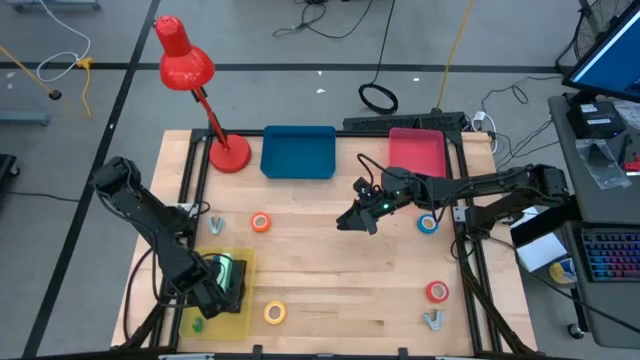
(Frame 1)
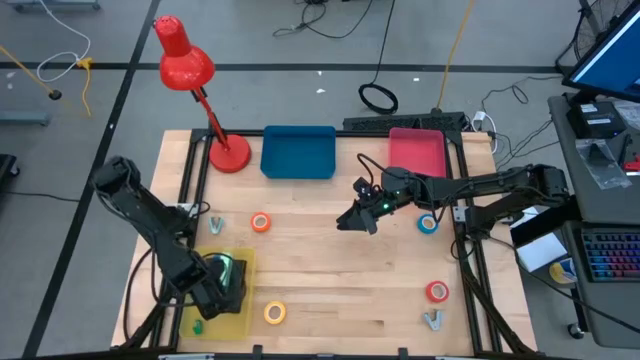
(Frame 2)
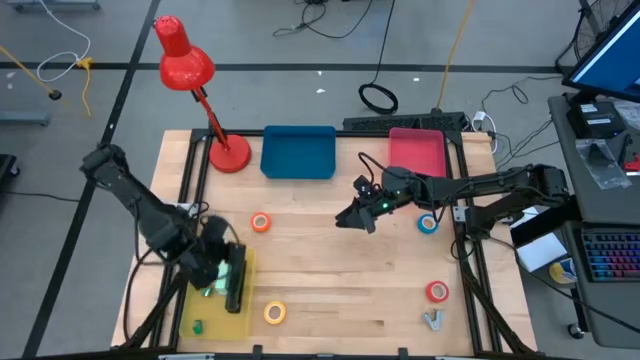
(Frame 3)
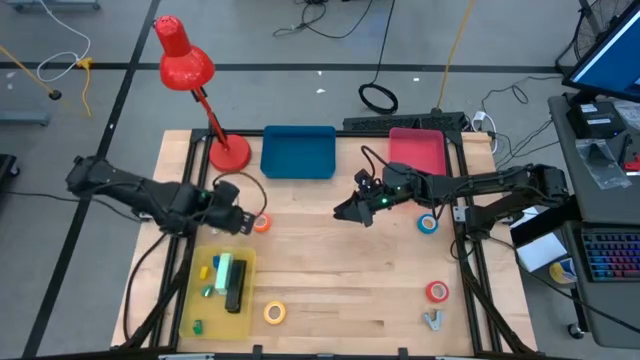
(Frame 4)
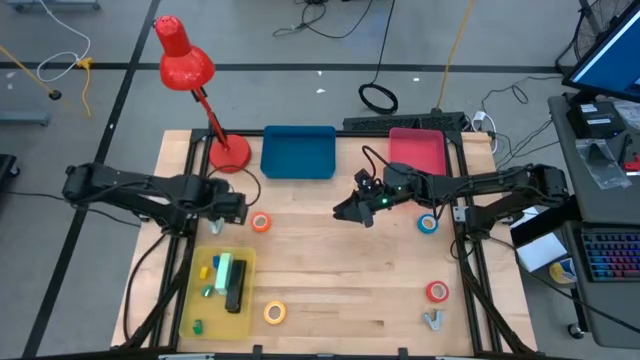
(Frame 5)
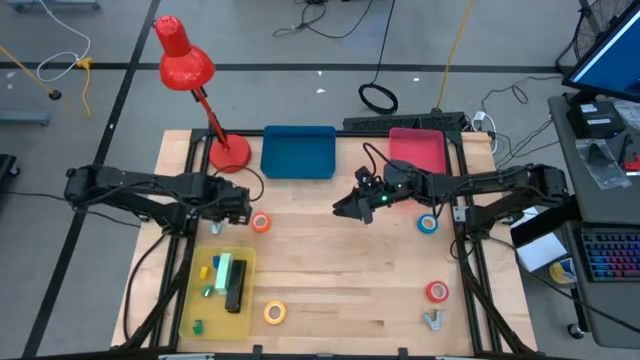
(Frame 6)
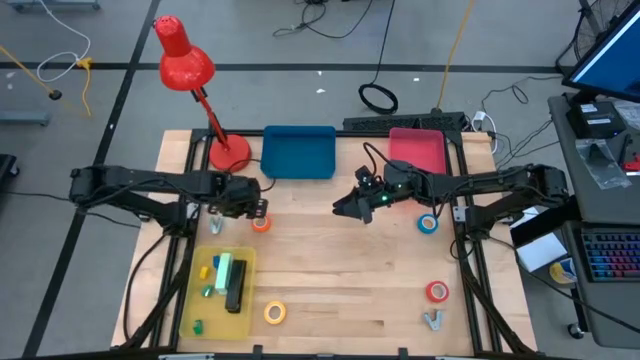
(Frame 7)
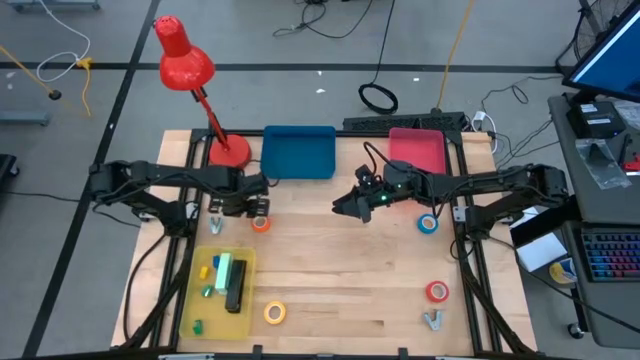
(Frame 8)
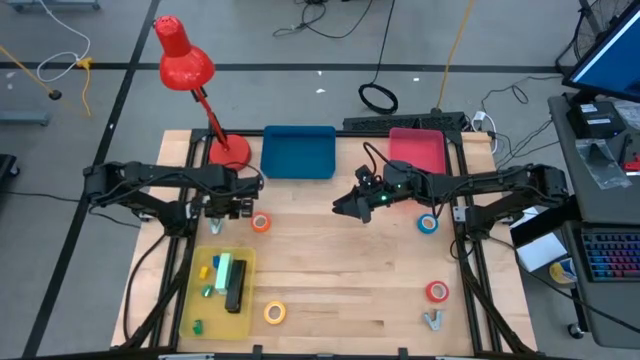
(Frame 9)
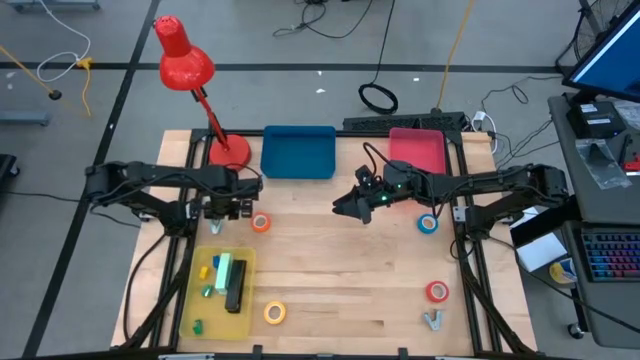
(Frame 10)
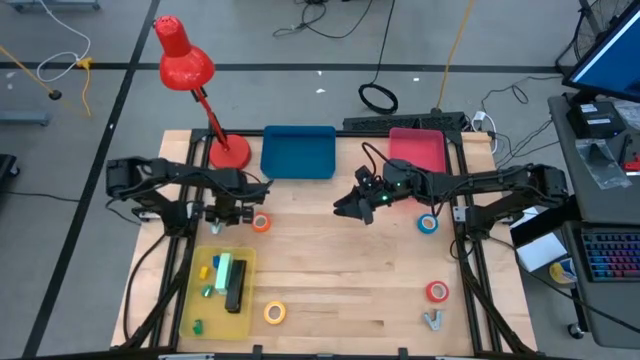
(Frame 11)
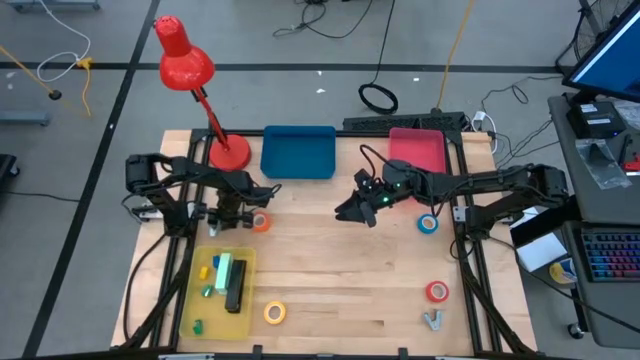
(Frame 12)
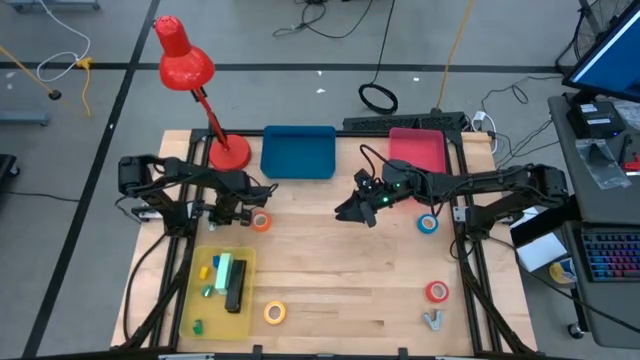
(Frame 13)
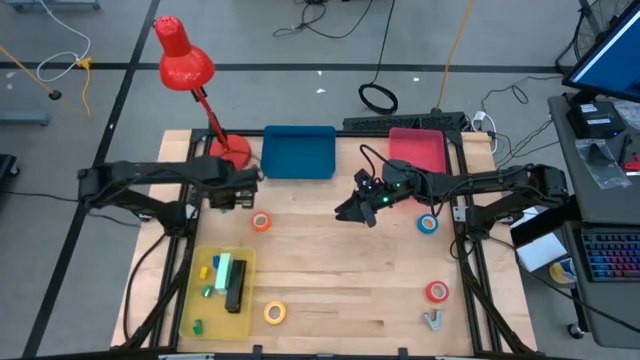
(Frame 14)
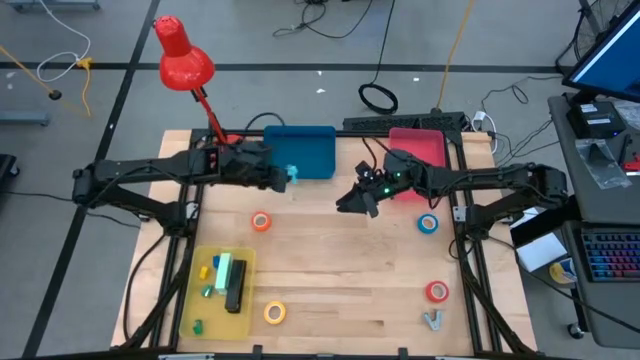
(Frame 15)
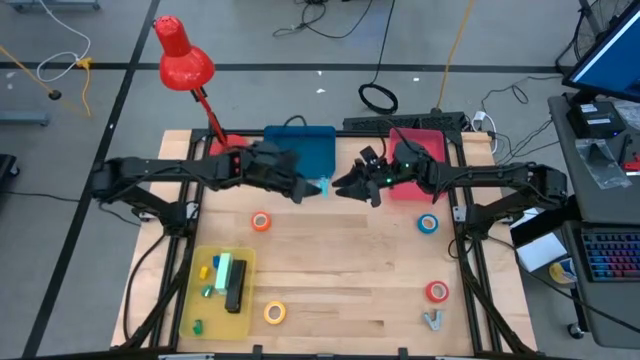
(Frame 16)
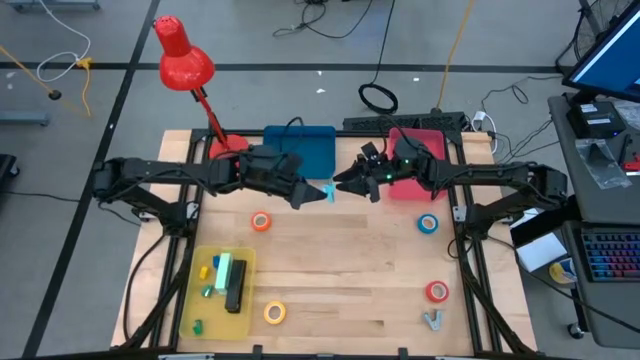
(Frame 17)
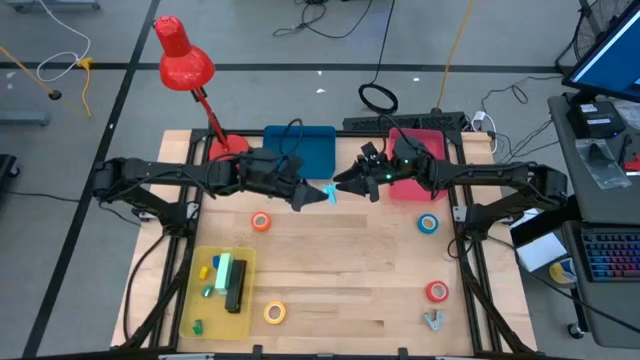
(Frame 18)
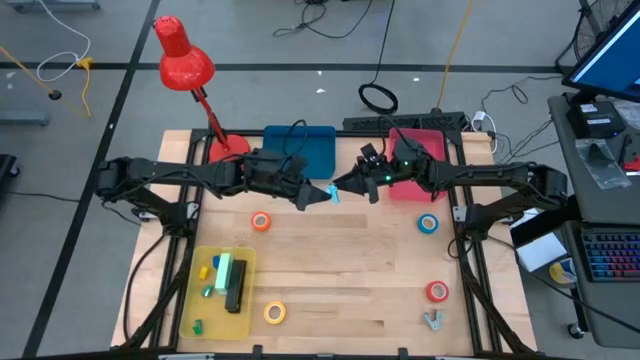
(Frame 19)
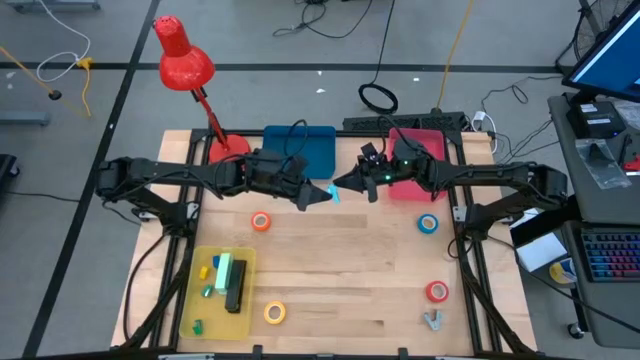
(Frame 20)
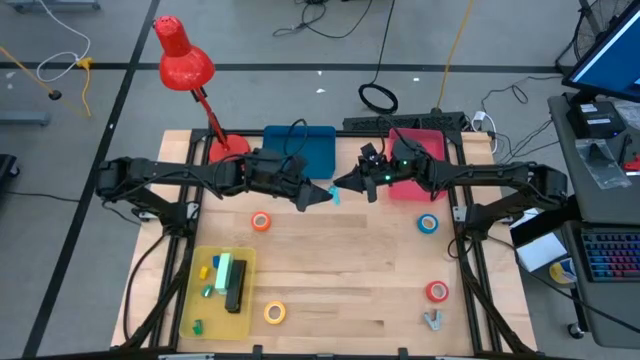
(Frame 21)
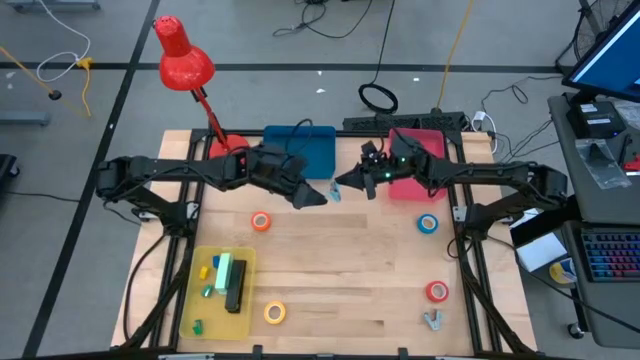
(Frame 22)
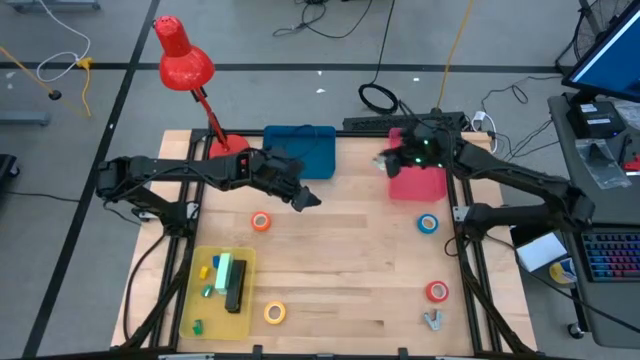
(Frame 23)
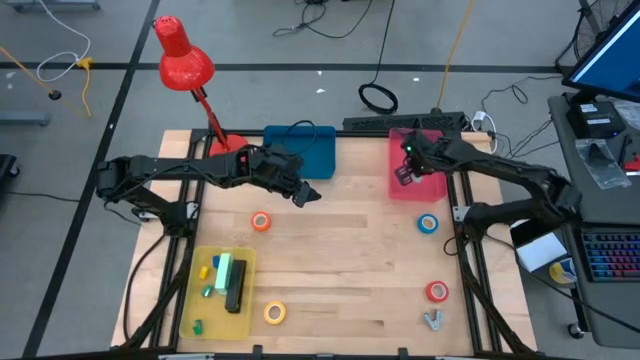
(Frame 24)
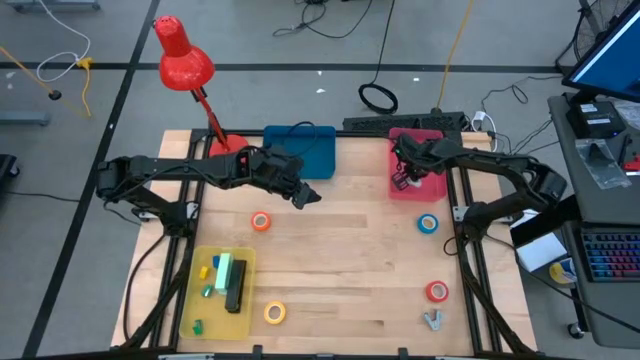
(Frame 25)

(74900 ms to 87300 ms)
Task: Pick and place Stapler, Stapler remover, tape
Put the blue staple remover into the red bin

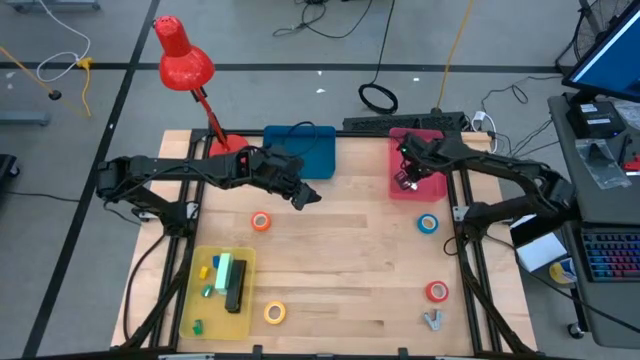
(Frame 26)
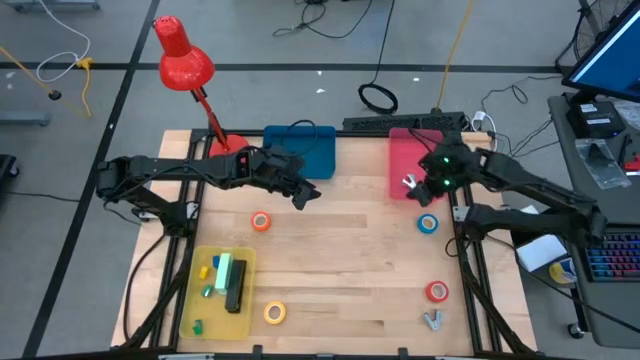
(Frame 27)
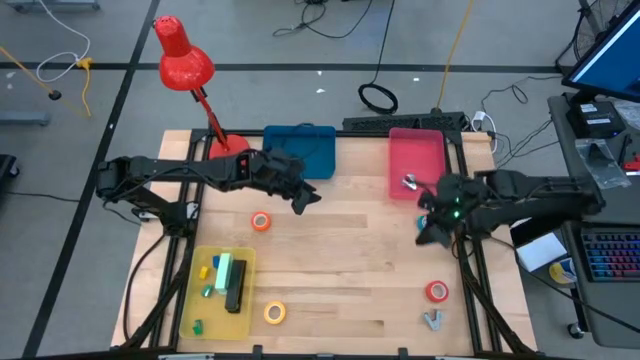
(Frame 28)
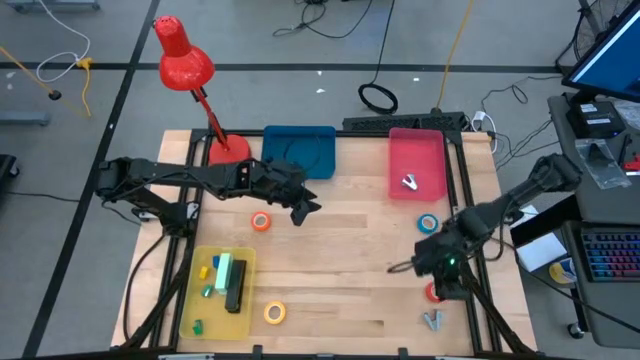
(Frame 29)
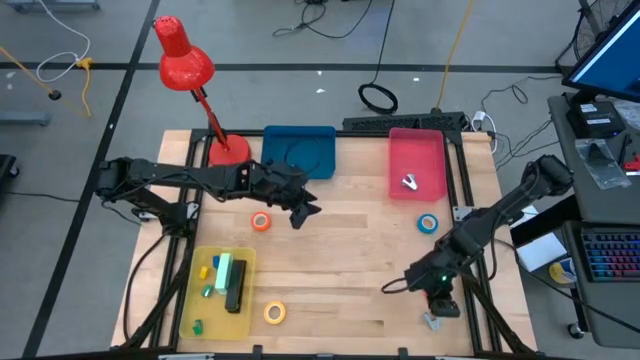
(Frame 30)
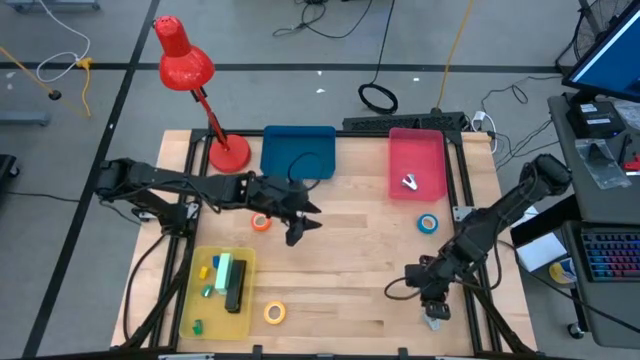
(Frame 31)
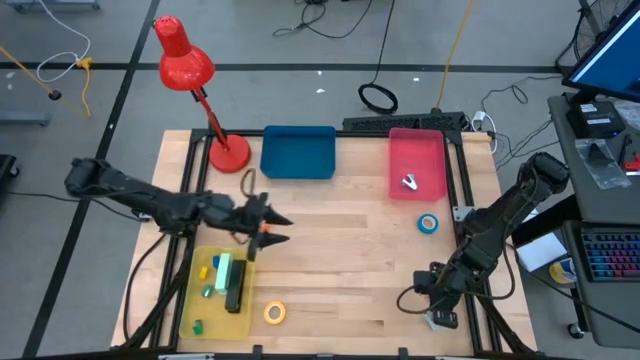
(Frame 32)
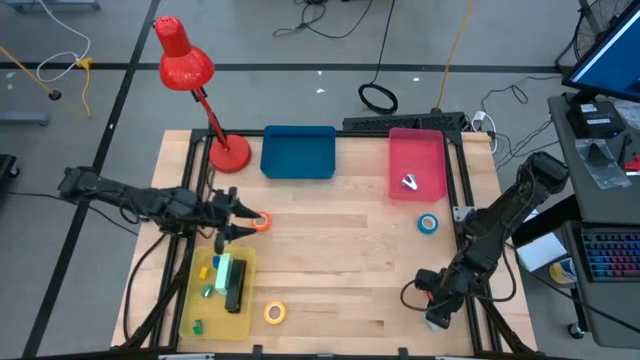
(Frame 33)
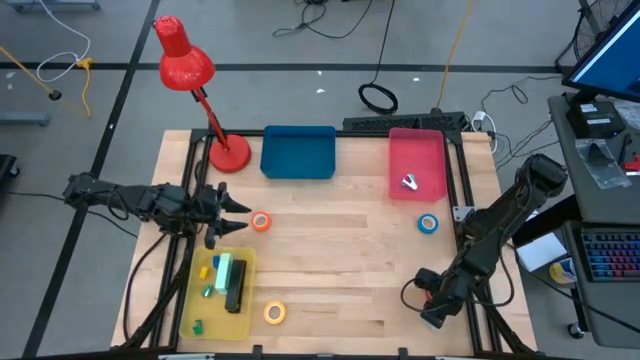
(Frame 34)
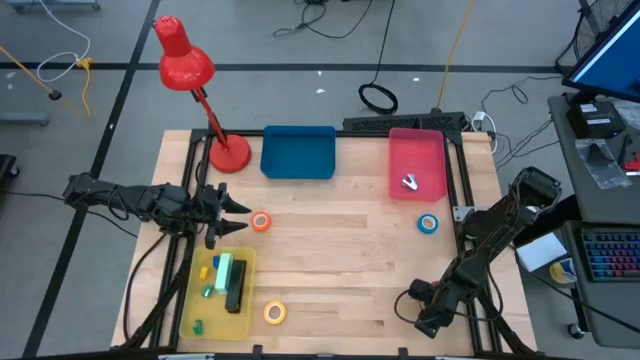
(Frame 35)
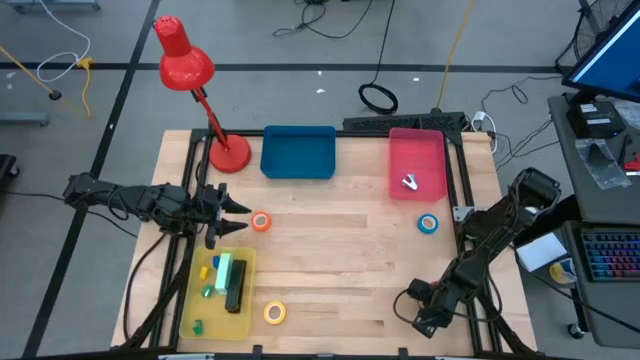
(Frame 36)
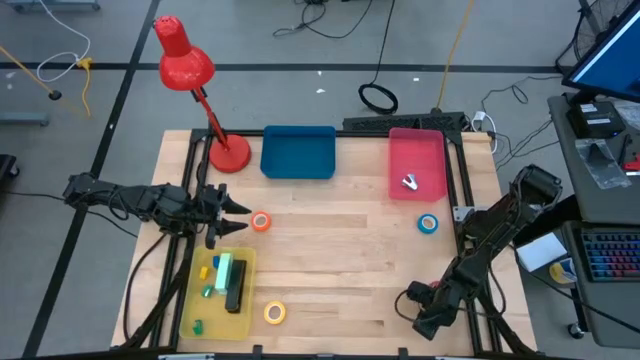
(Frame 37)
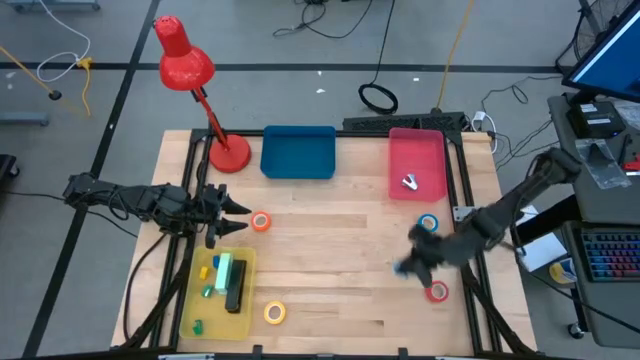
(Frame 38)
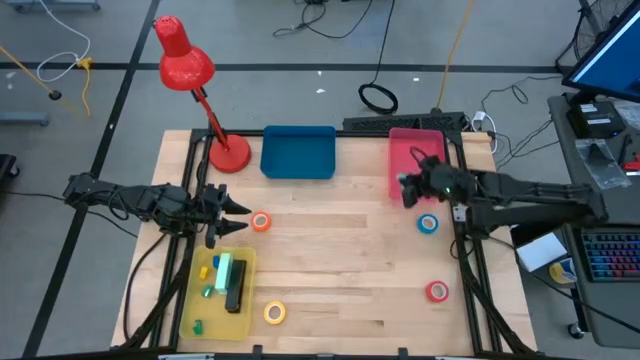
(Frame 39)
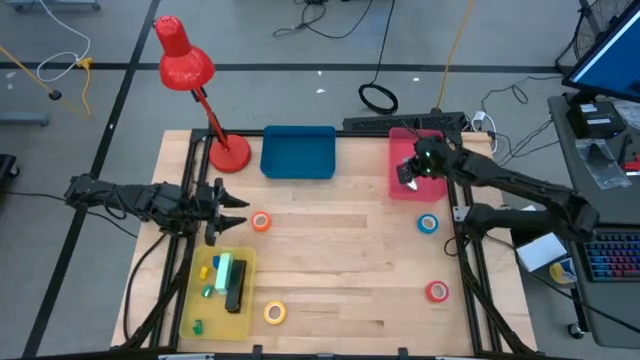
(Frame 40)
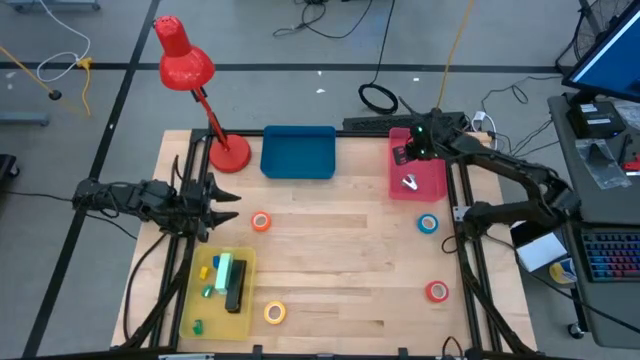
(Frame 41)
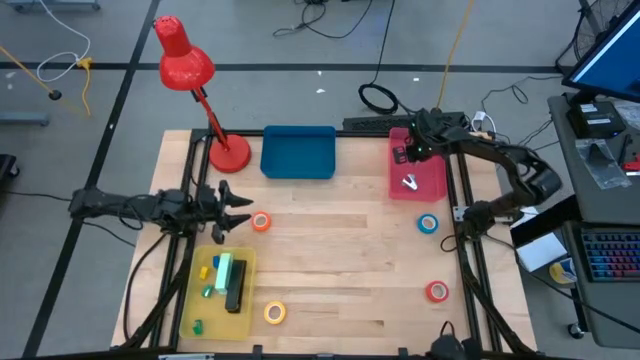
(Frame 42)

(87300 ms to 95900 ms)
Put the blue staple remover into the red bin
